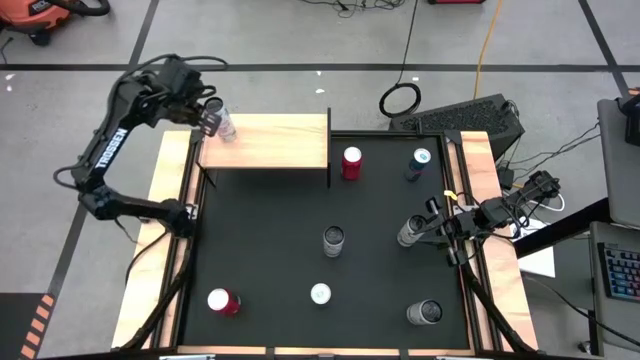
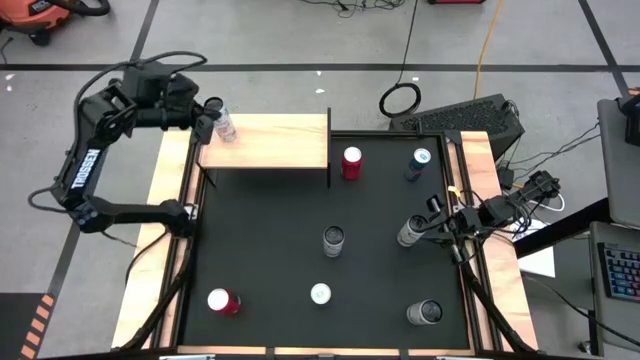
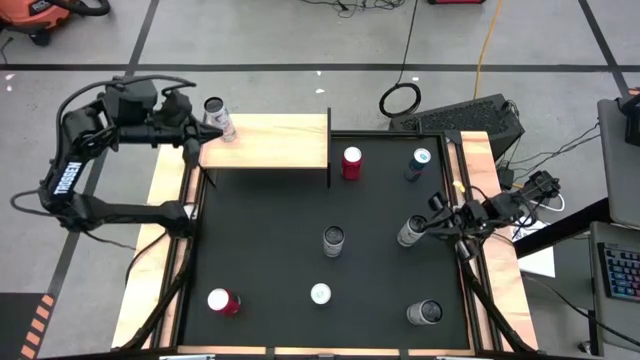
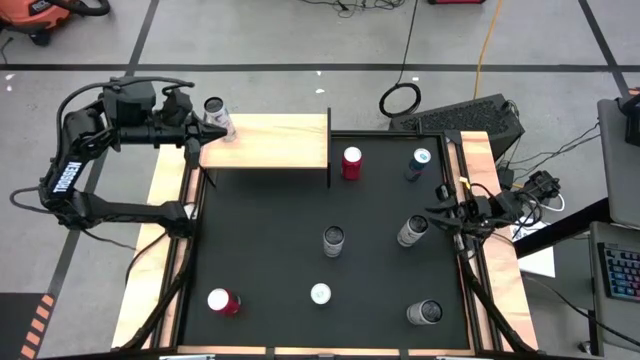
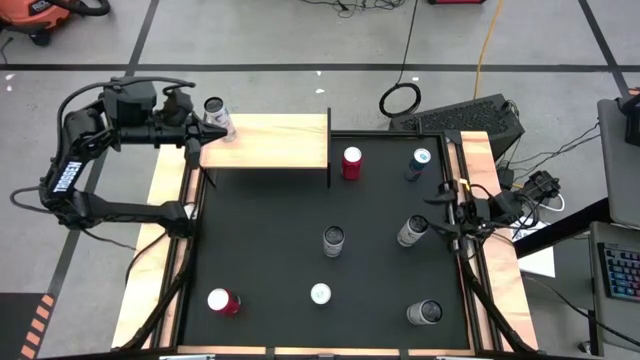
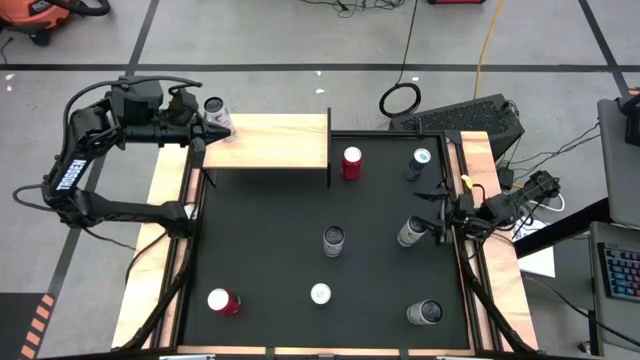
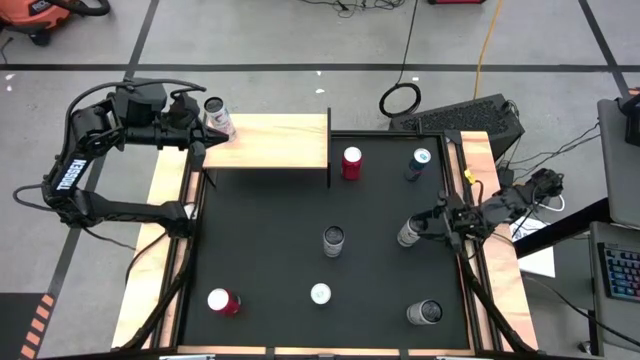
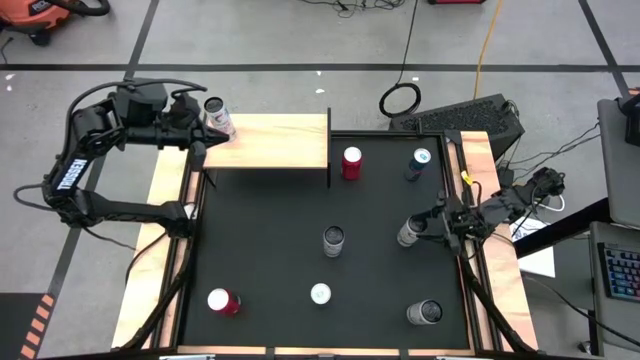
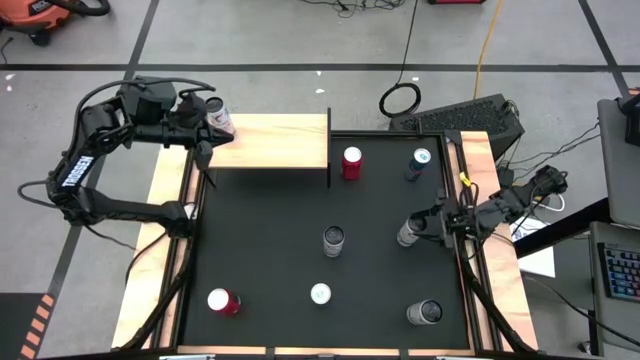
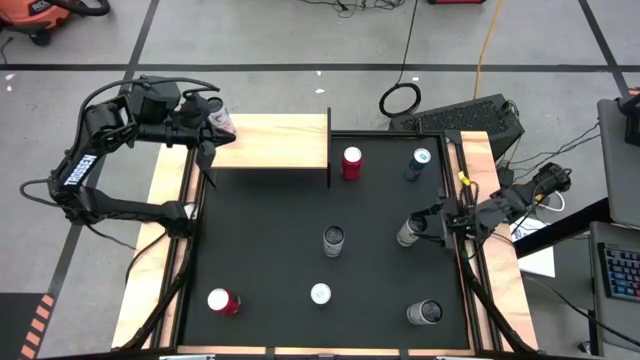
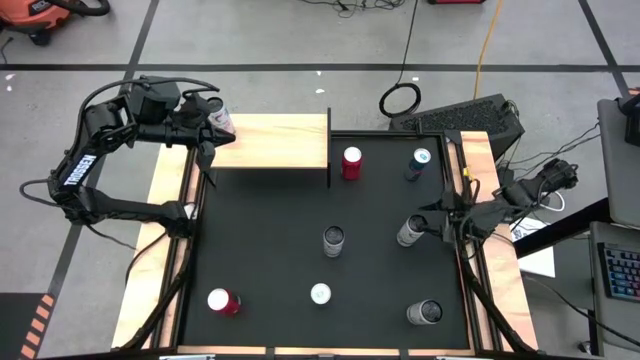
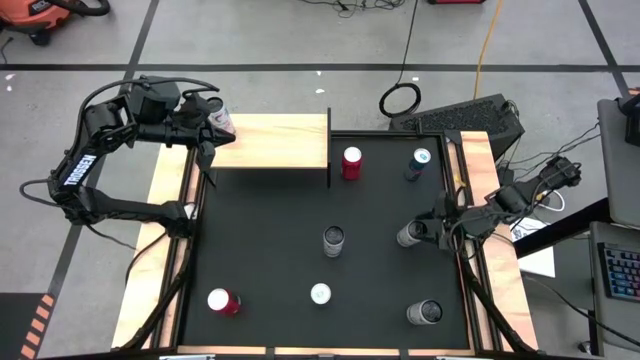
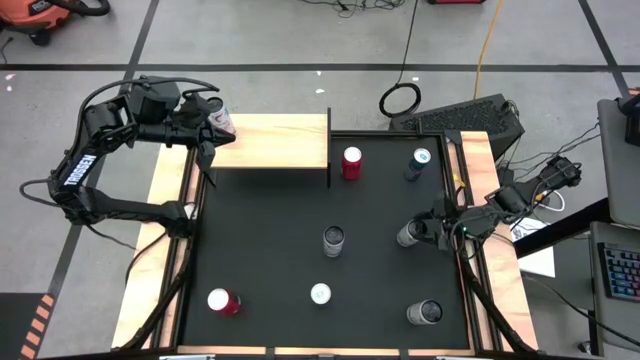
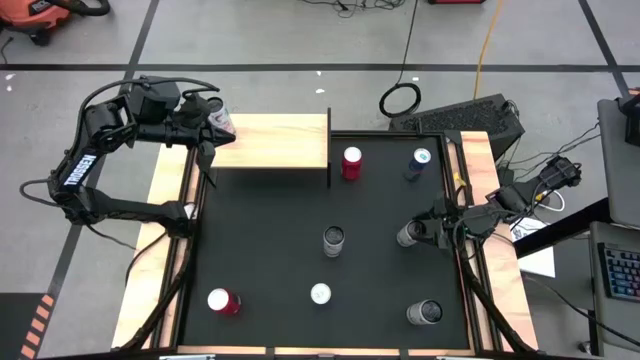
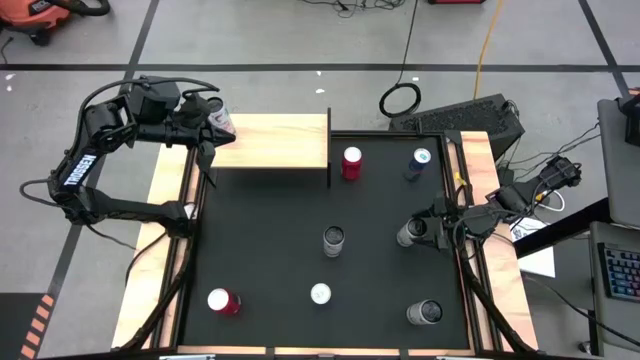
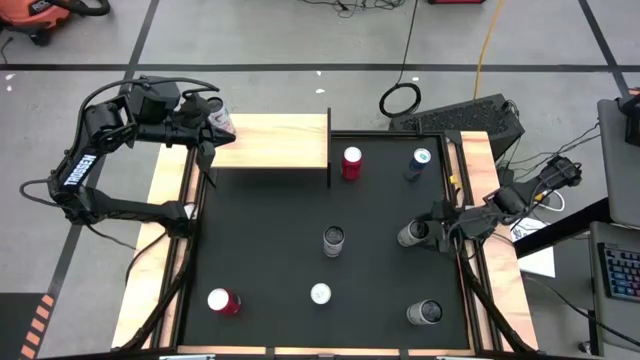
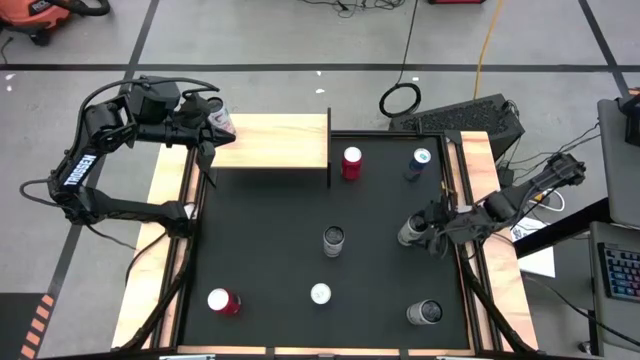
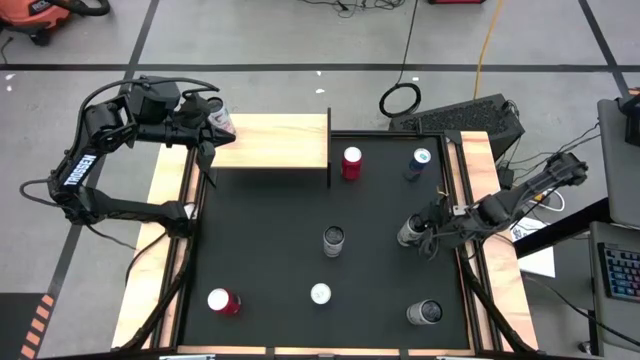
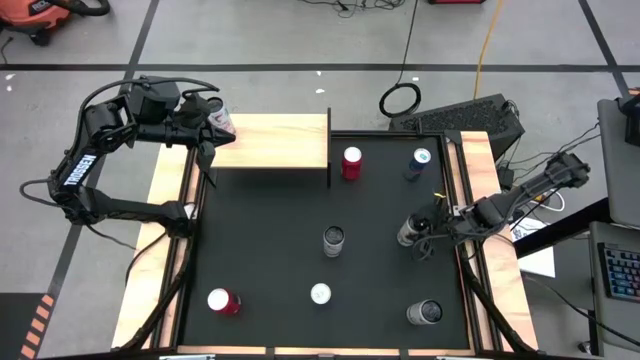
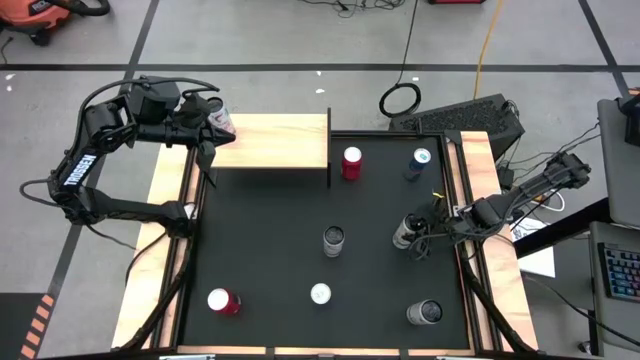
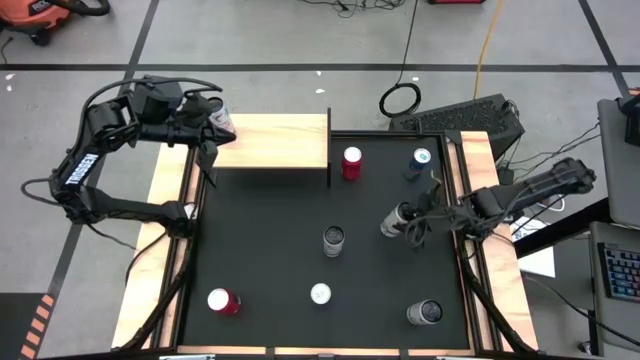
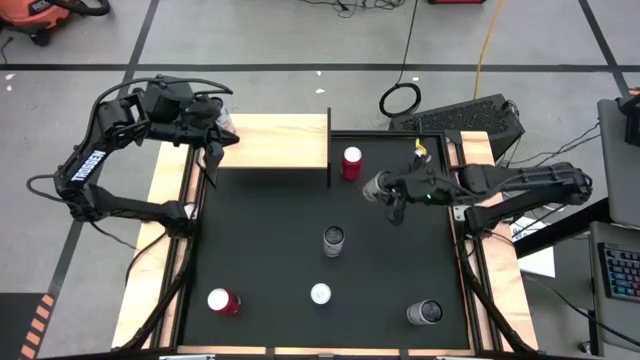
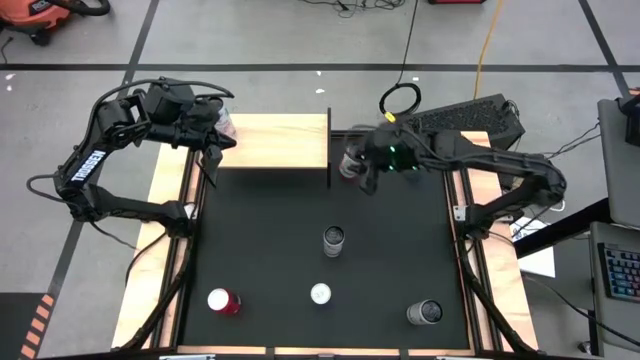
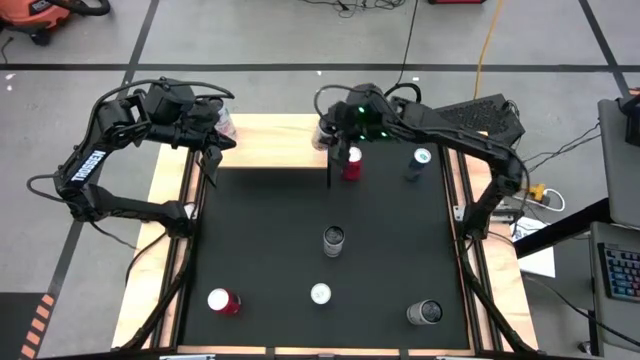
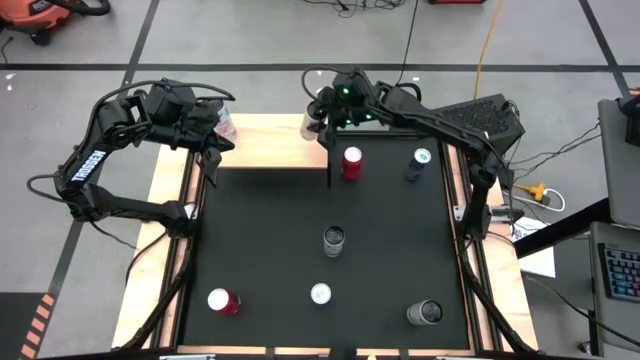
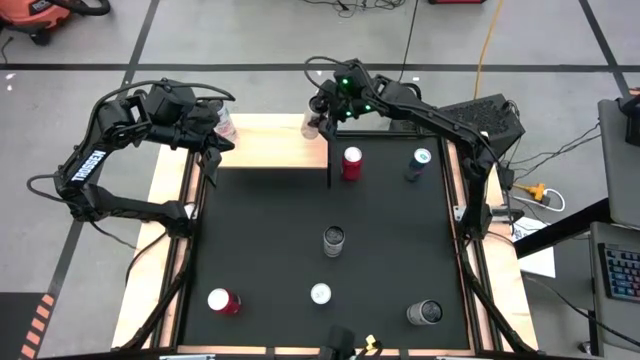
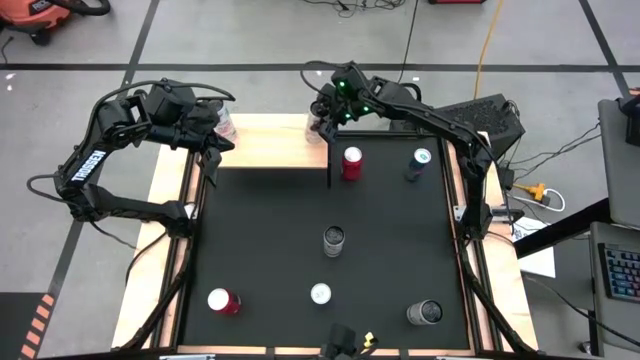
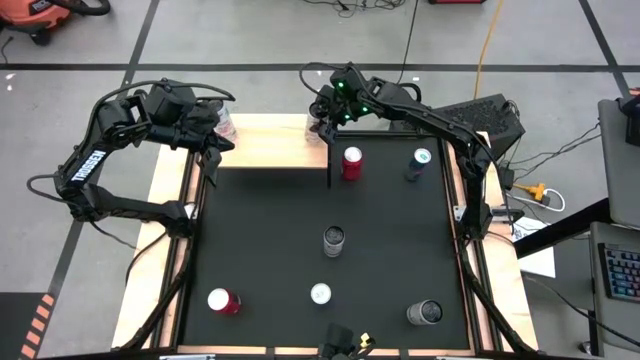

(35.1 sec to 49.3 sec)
Task: Place canned beverage on shelf
Put the right white yellow soda can on the shelf

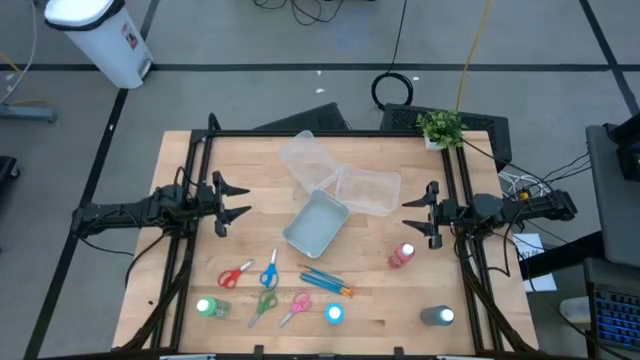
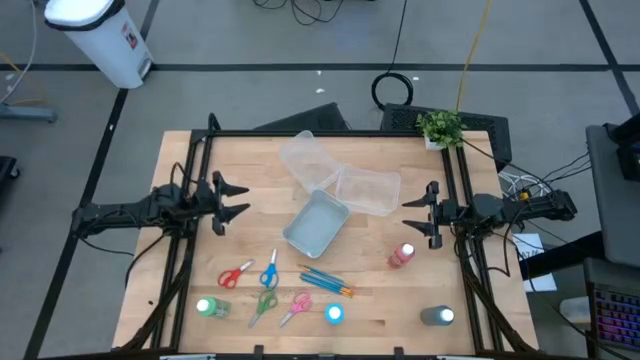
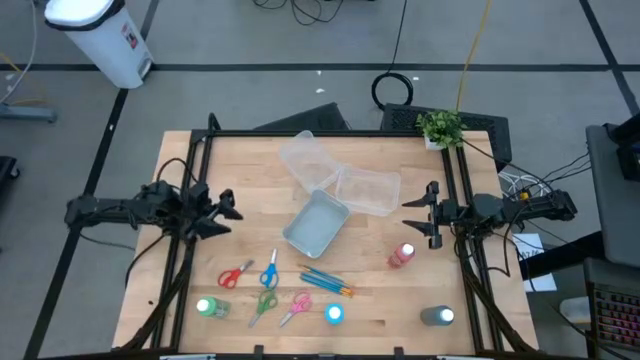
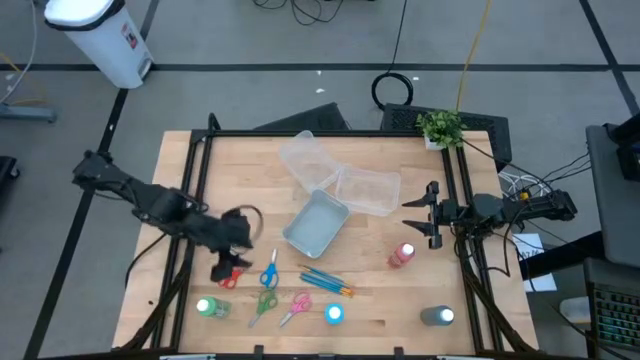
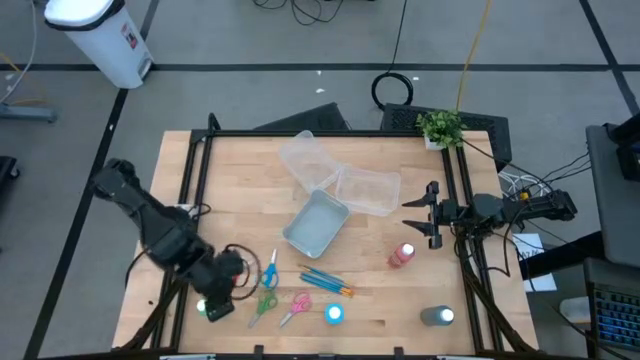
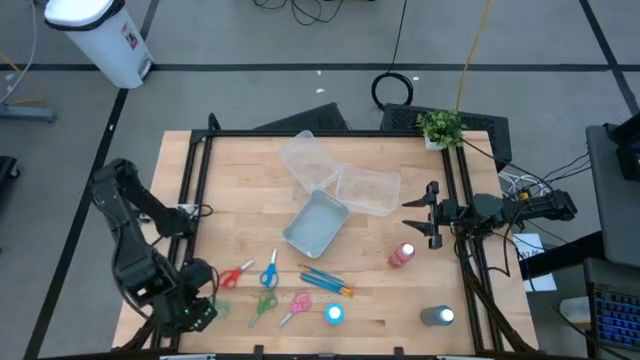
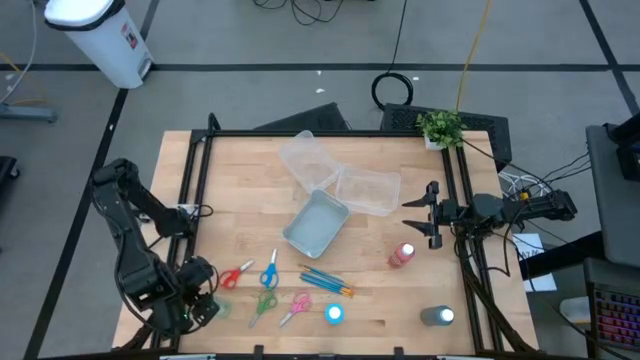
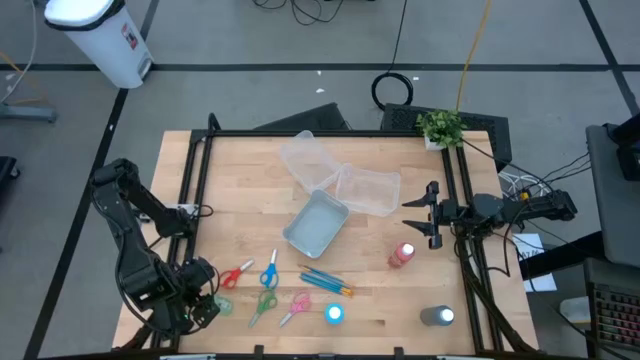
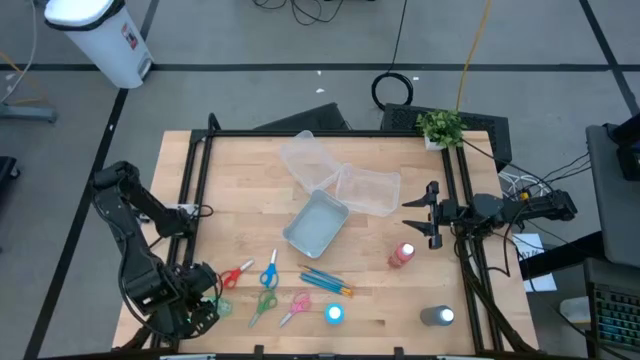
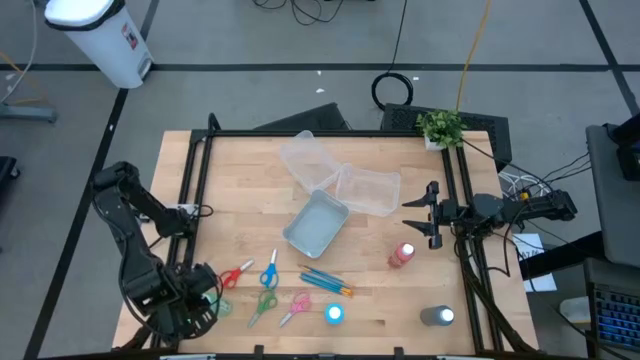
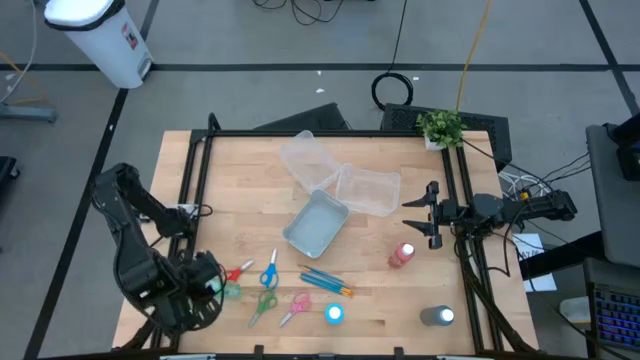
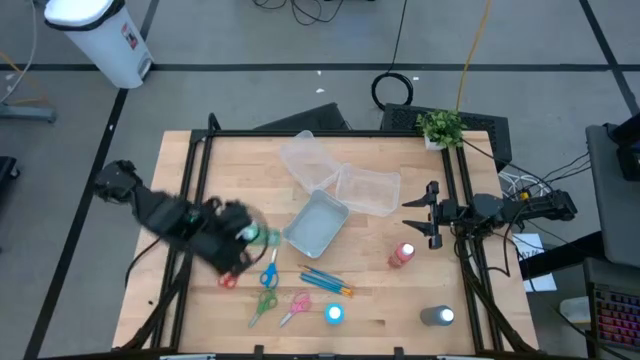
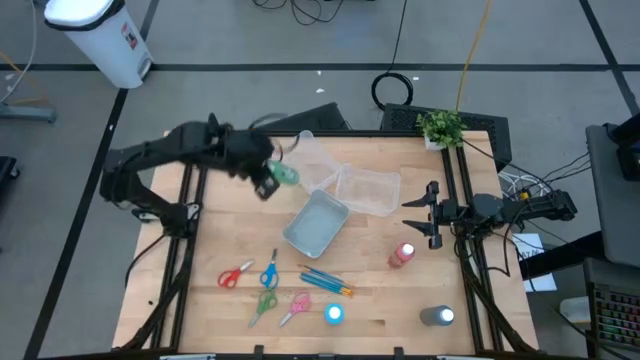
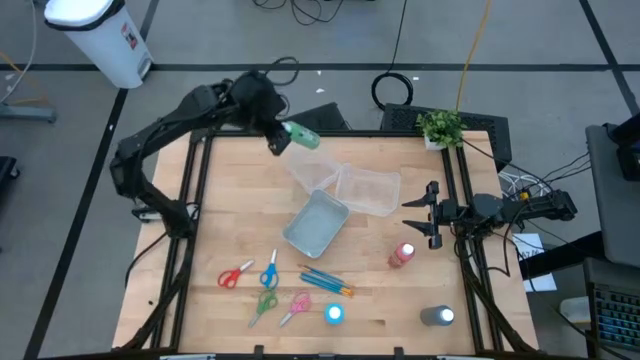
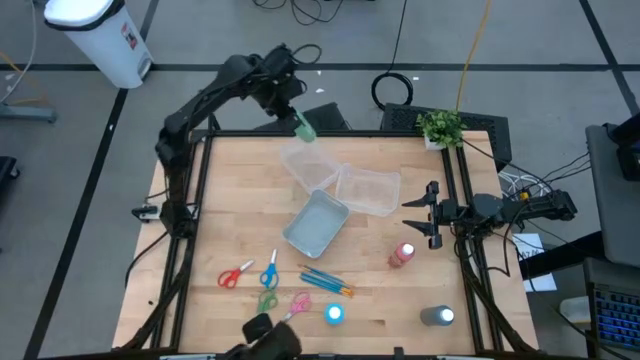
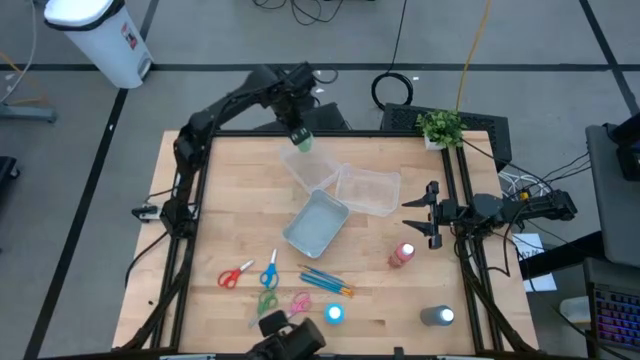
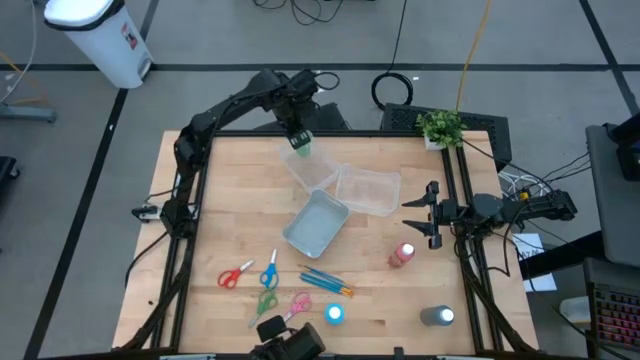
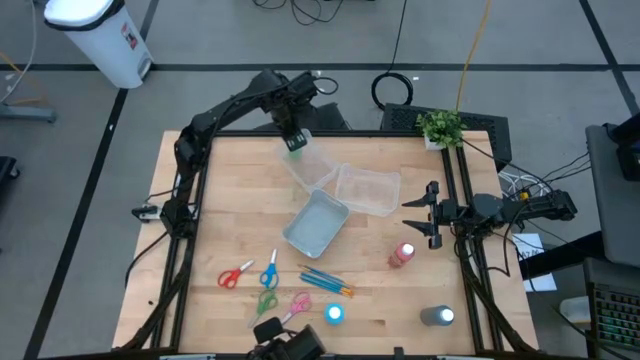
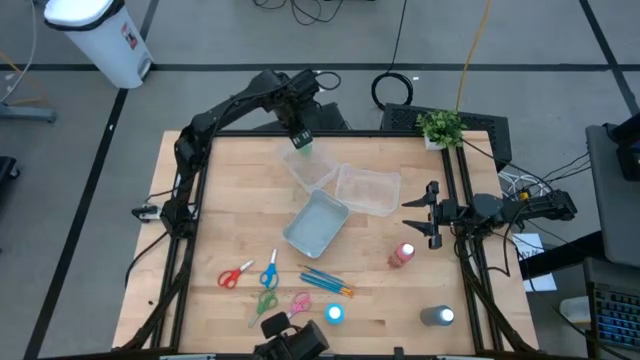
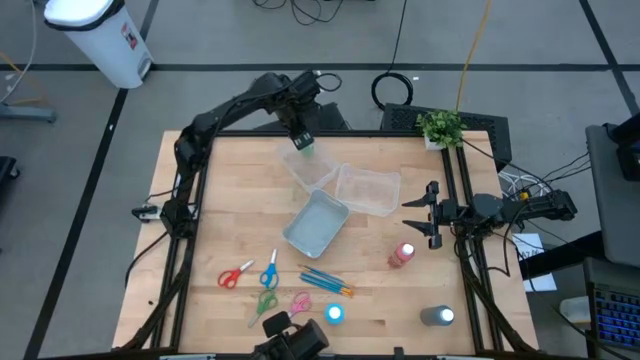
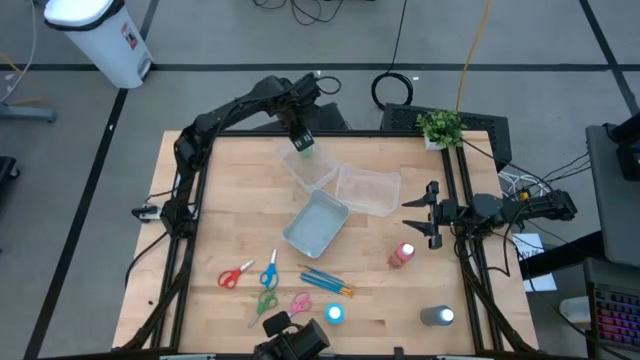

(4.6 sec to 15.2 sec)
Task: Pick & Place Paint Supplies
Put the green paint bottle into the left transparent bin
